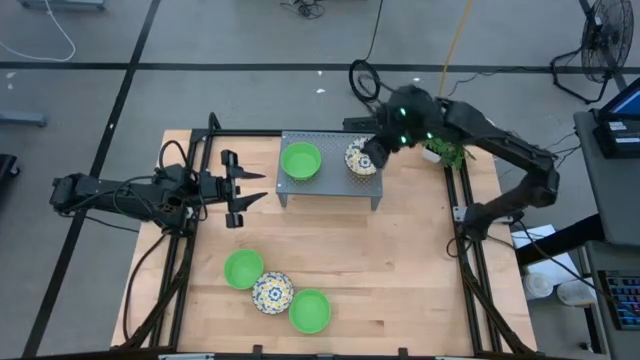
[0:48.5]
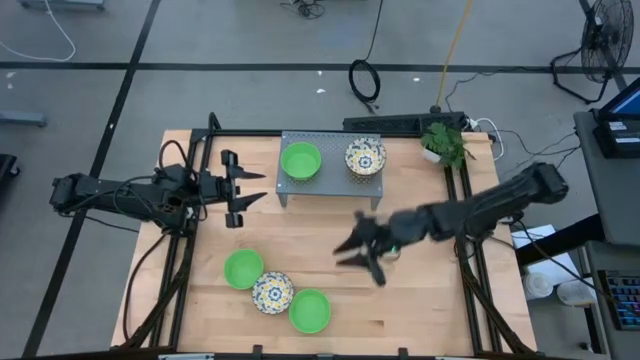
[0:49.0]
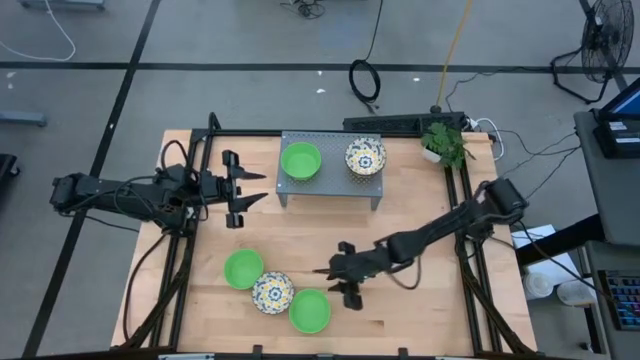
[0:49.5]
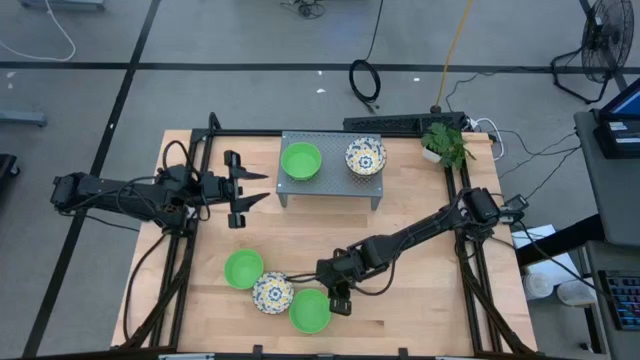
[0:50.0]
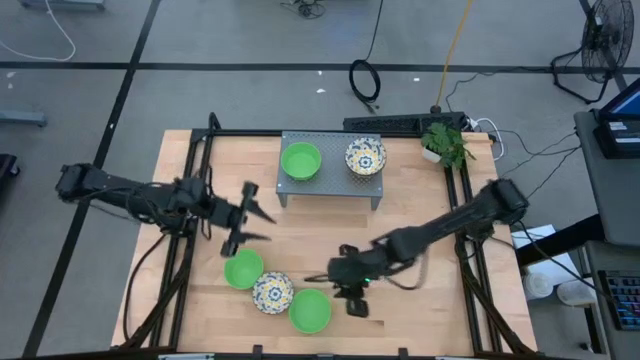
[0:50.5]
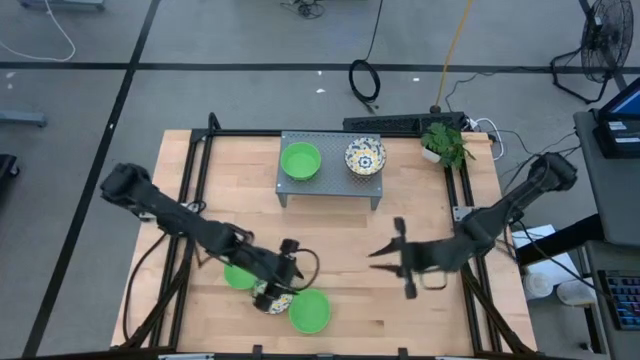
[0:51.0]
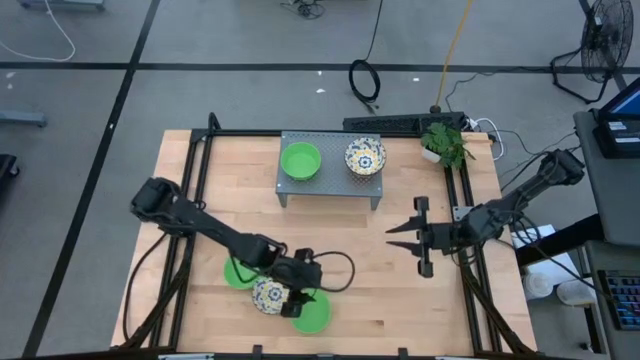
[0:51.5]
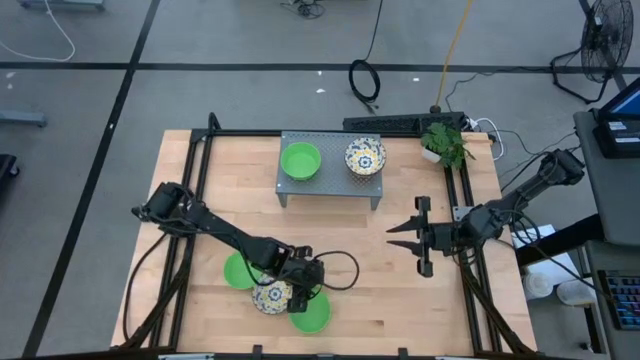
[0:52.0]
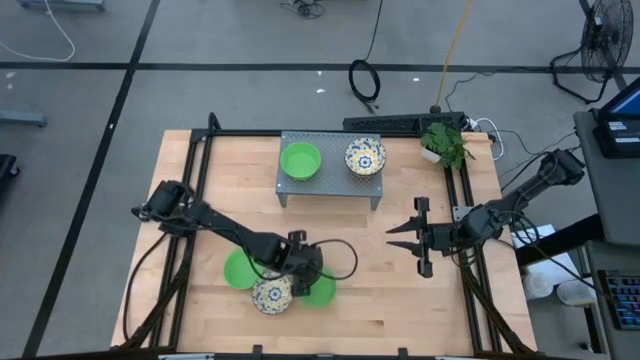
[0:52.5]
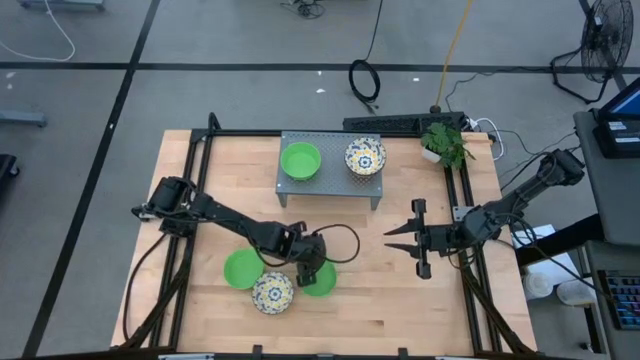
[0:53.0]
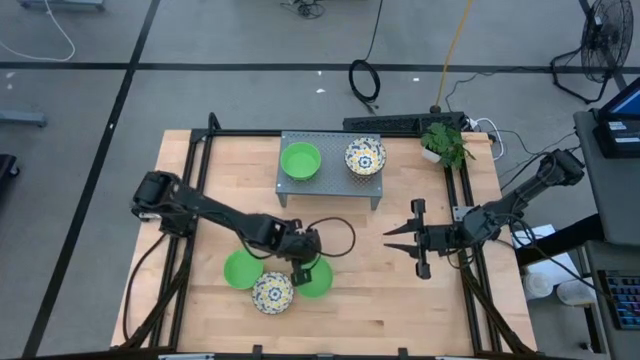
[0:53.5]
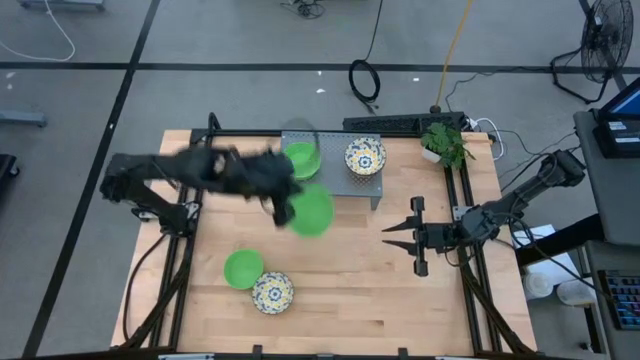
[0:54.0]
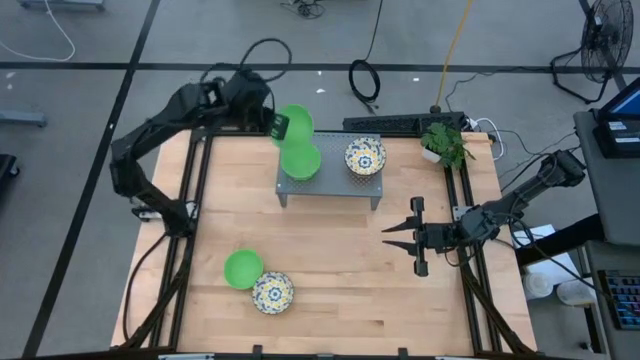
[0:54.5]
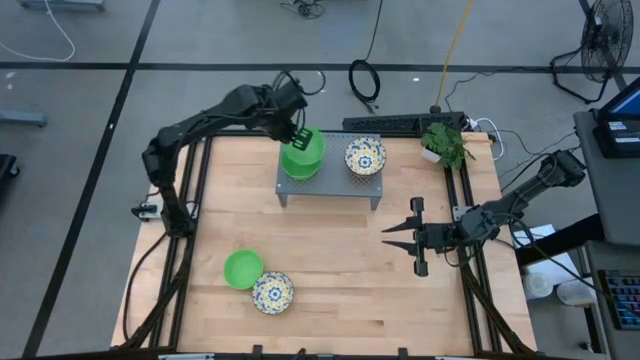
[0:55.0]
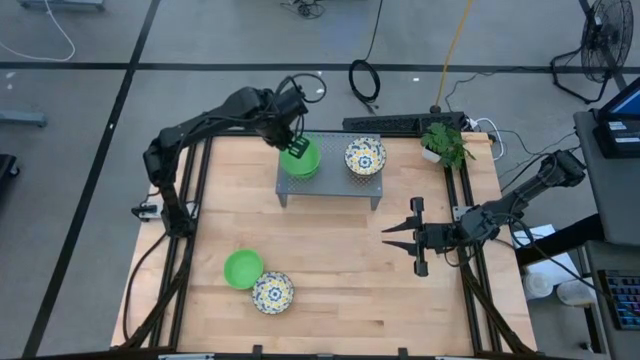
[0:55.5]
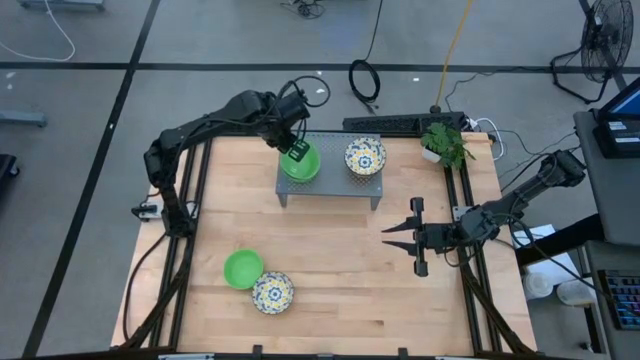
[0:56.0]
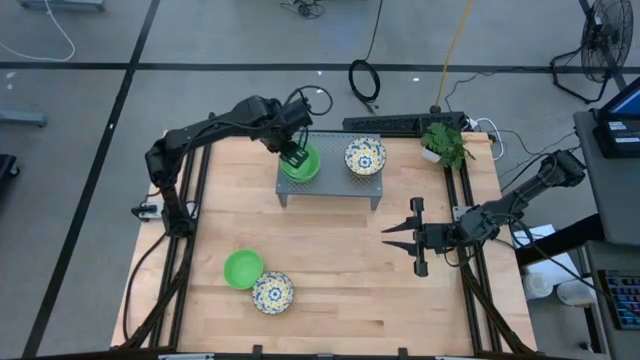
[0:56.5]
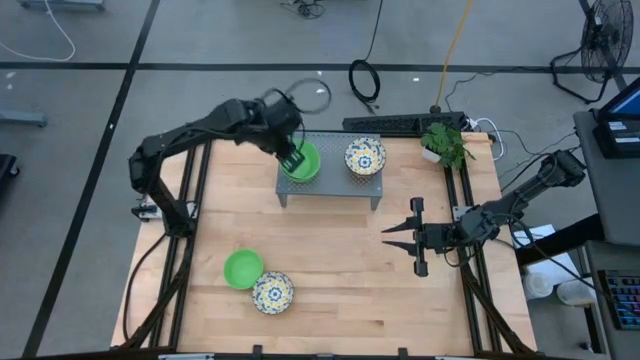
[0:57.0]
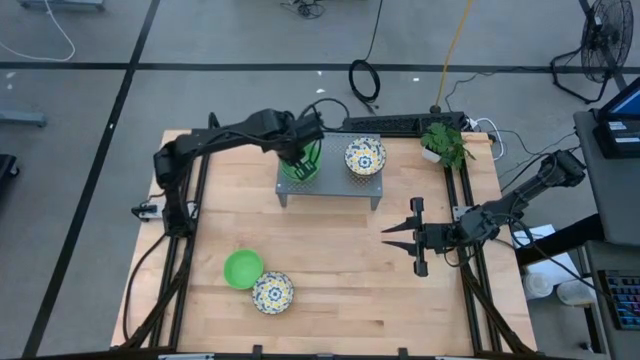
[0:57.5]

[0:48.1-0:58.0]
Task: Pick & Place Mini bowls
Stack the green bowl on top of the green bowl on the shelf

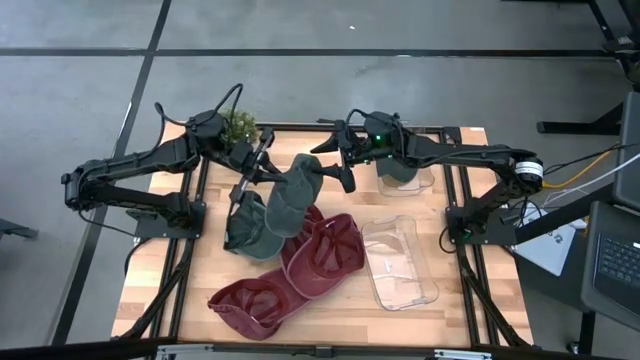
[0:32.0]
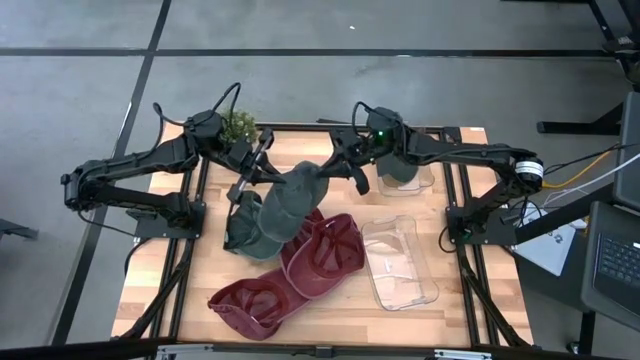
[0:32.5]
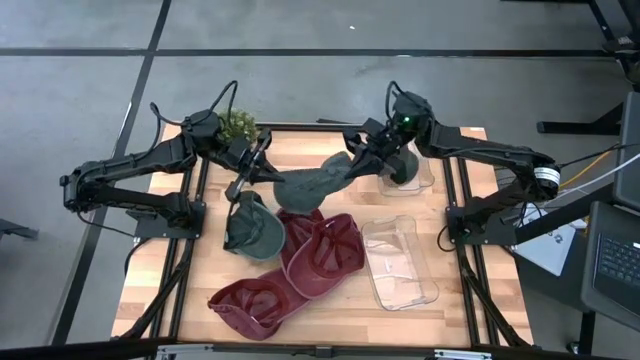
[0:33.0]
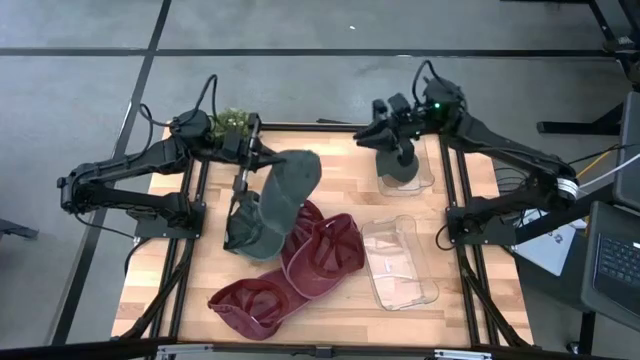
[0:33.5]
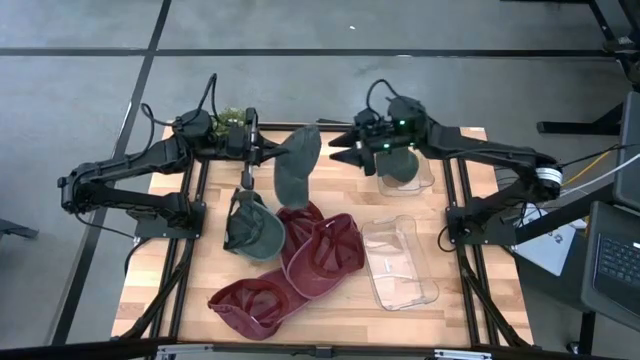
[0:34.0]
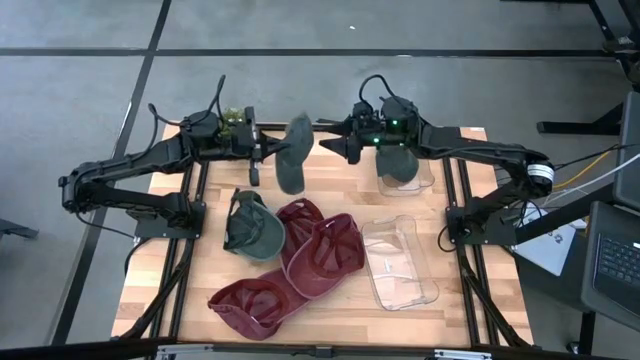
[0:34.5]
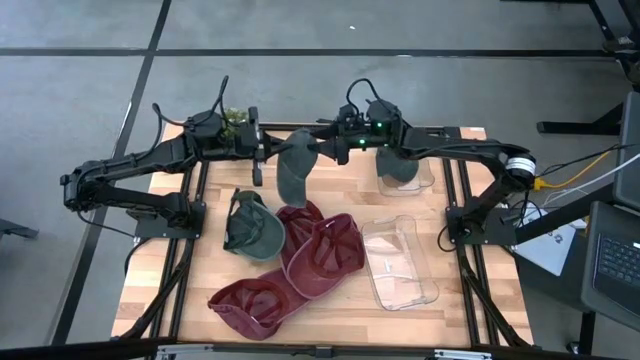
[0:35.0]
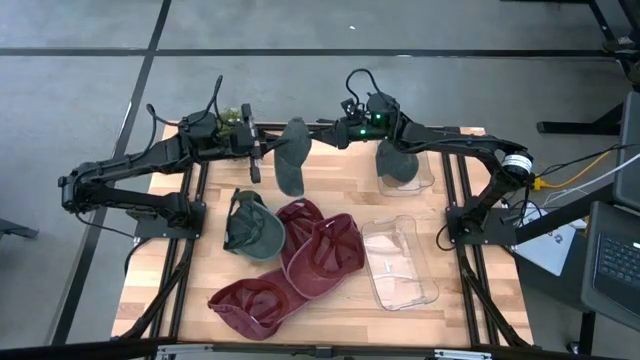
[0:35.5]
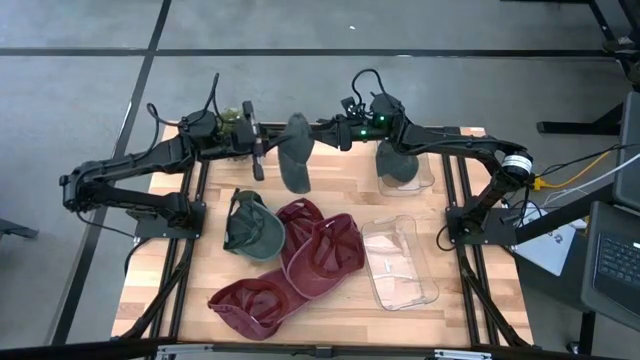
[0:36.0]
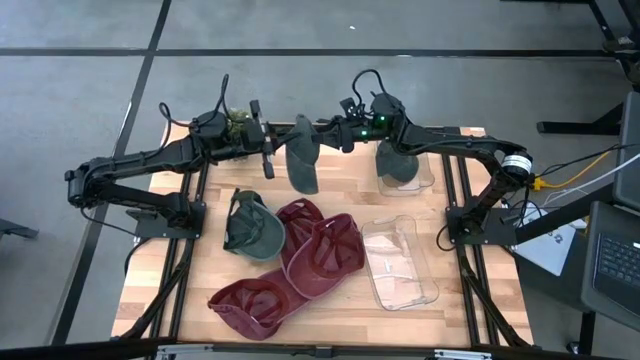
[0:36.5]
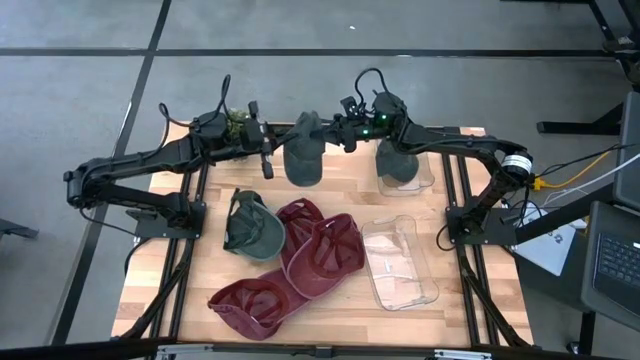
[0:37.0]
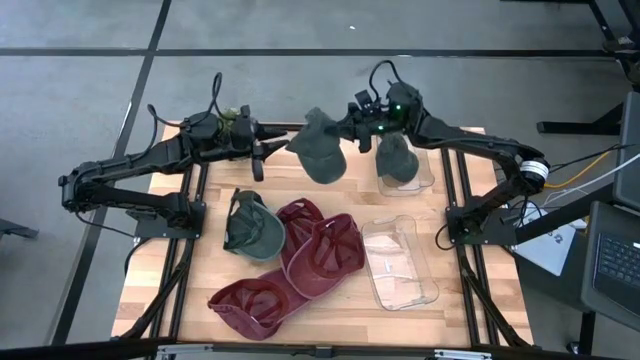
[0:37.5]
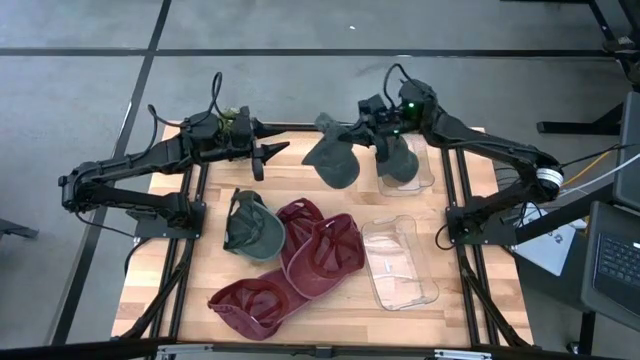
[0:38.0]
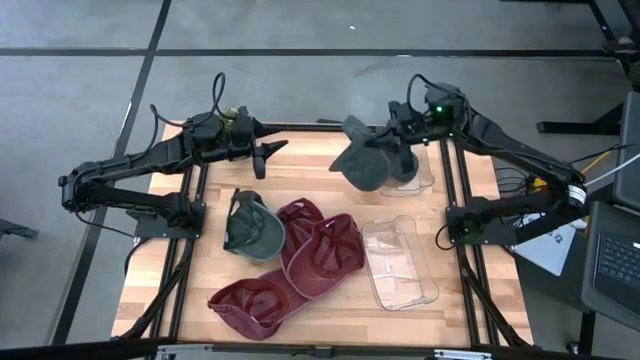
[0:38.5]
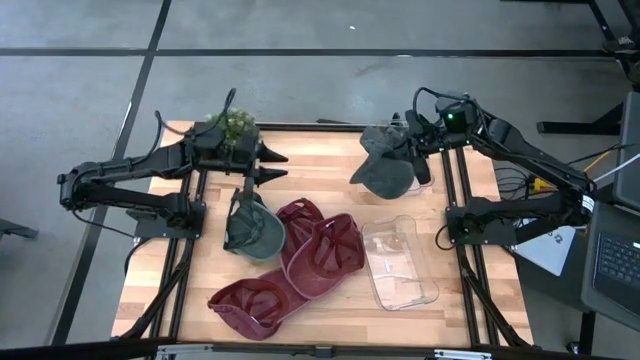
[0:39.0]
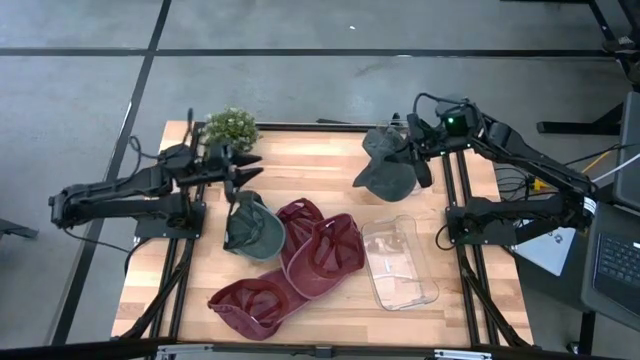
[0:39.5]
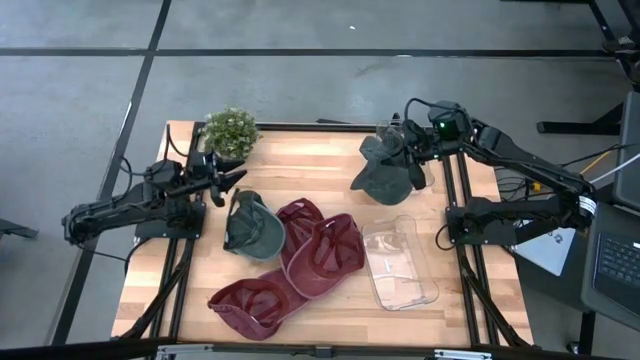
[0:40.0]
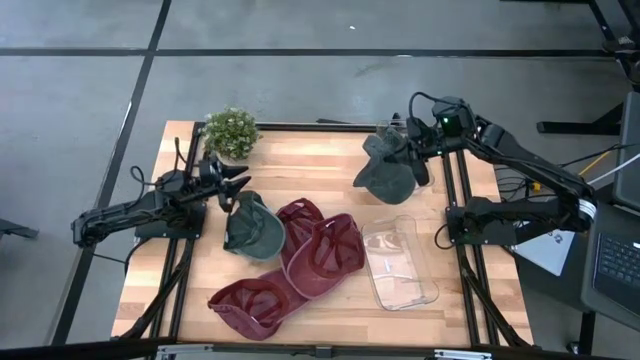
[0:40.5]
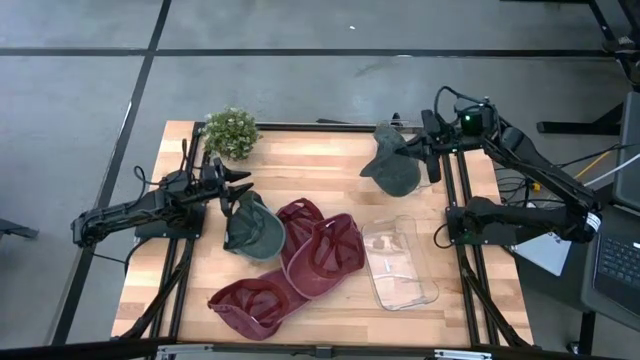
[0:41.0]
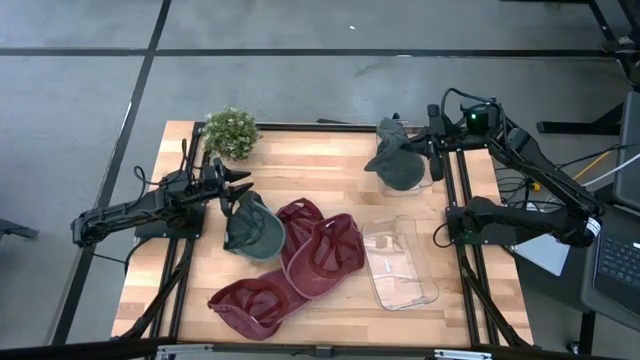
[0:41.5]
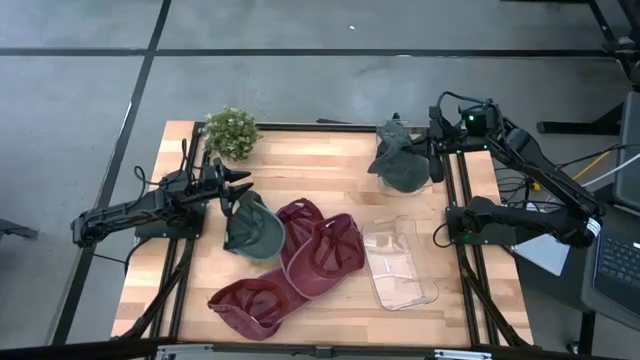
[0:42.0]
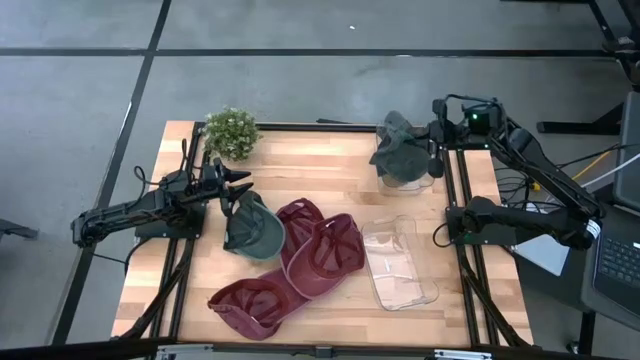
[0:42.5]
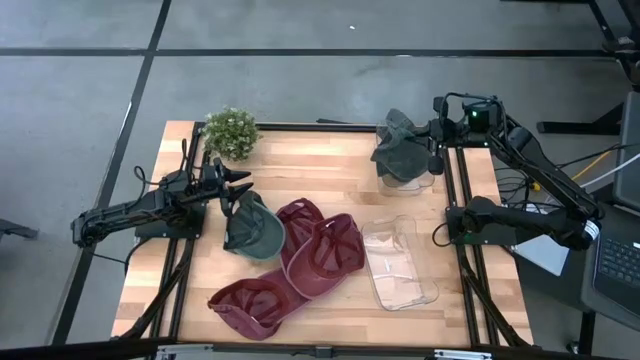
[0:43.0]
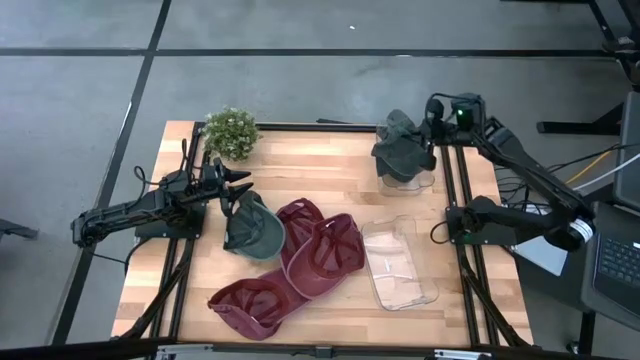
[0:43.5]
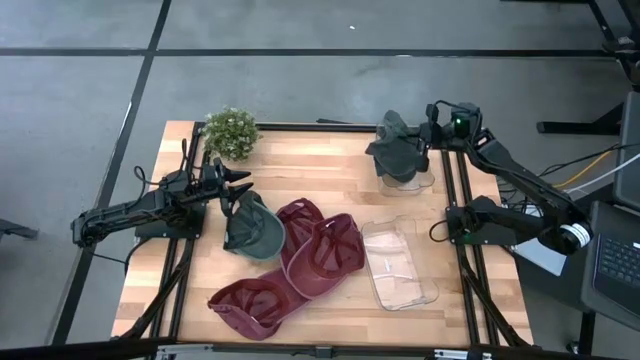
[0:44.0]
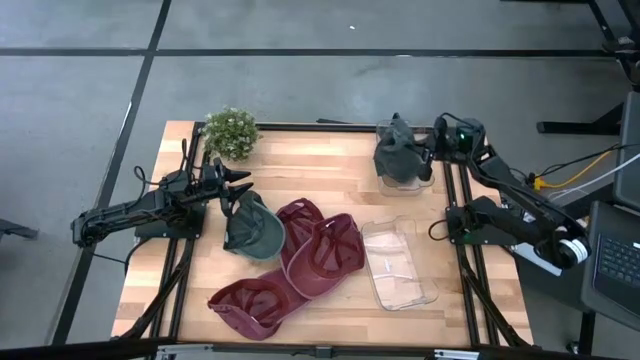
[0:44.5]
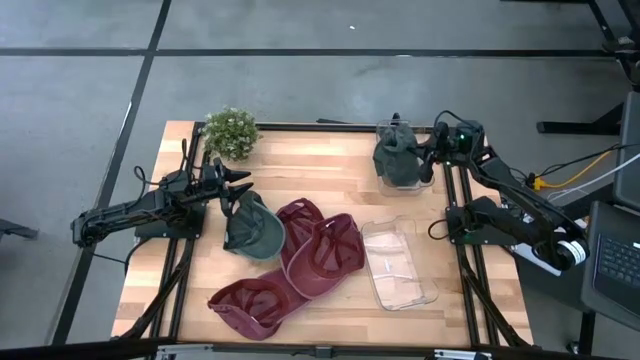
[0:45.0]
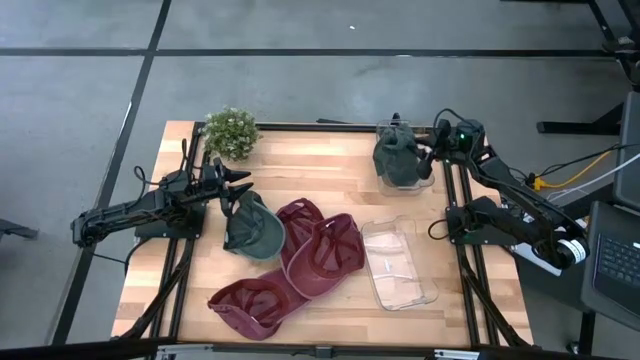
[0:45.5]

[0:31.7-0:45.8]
Task: Pick & Place hat
Put the right gray cap into the top transparent bin
